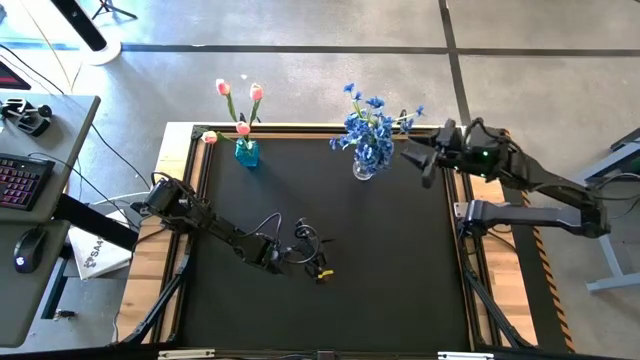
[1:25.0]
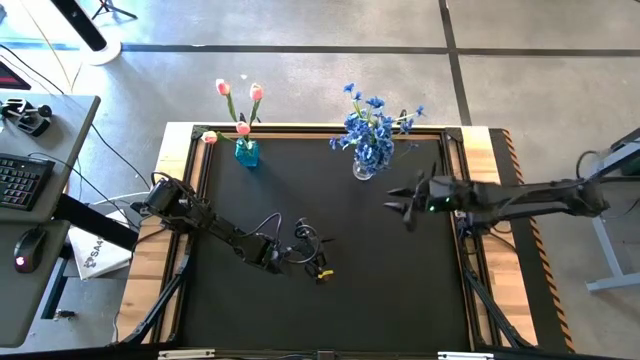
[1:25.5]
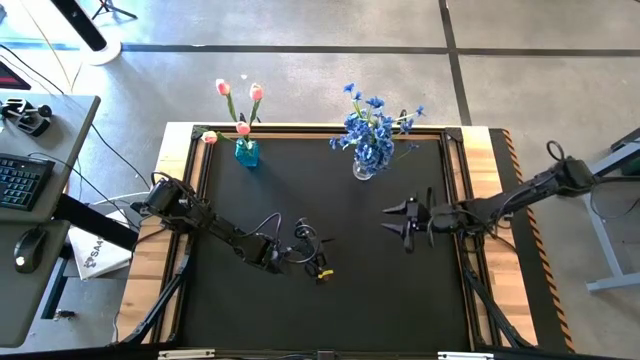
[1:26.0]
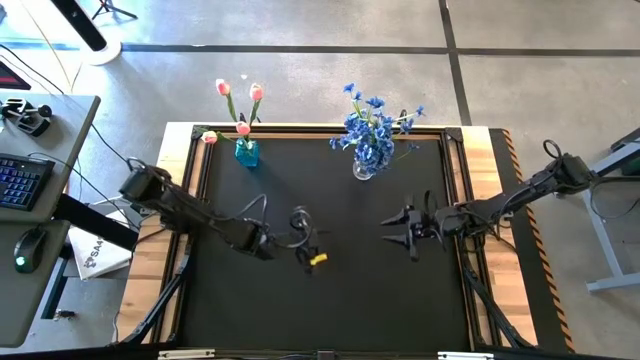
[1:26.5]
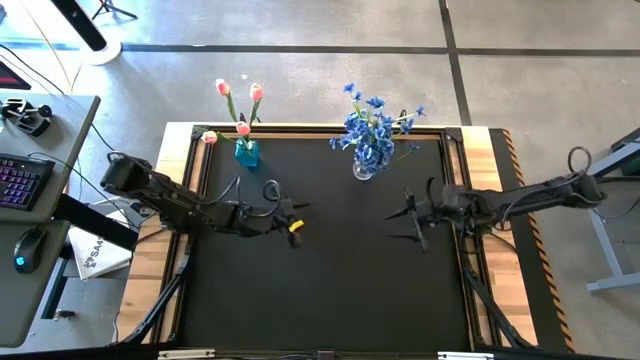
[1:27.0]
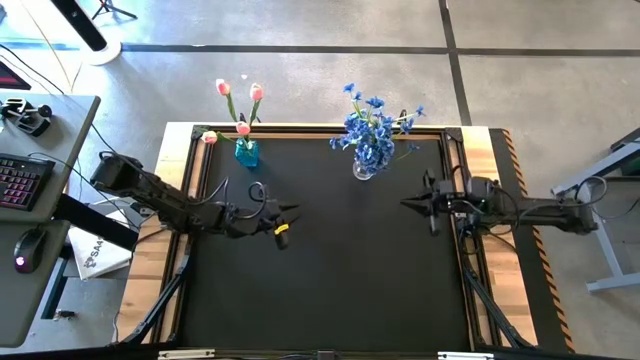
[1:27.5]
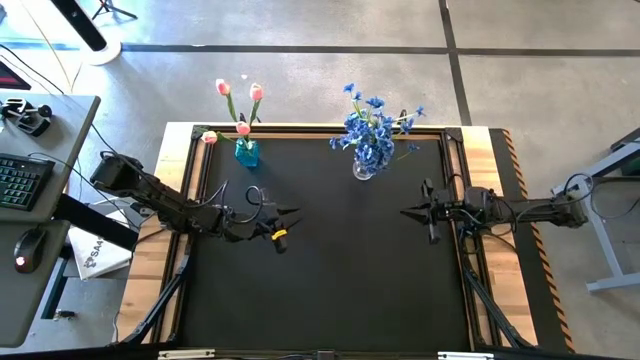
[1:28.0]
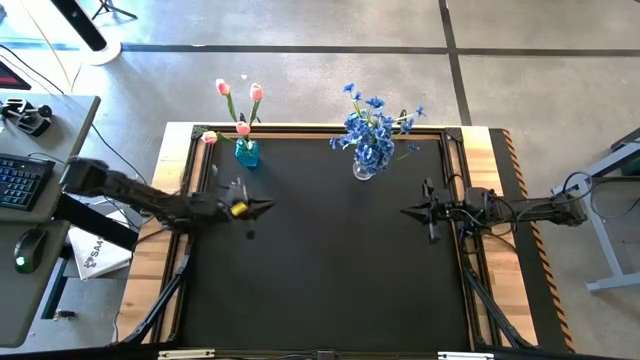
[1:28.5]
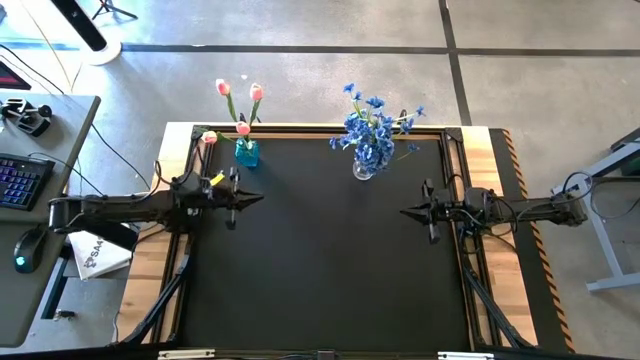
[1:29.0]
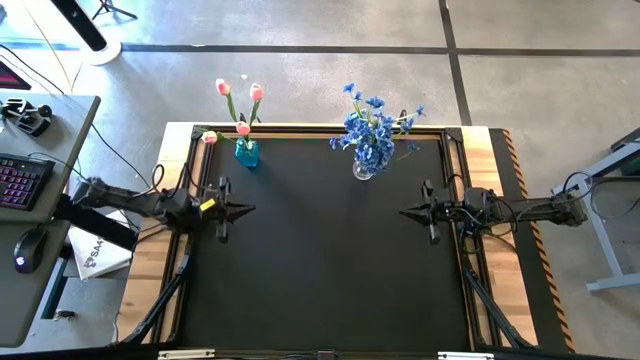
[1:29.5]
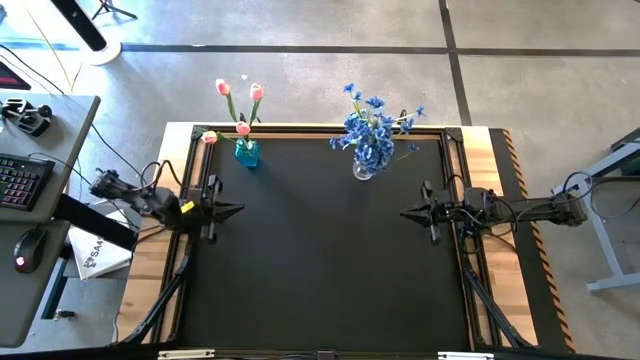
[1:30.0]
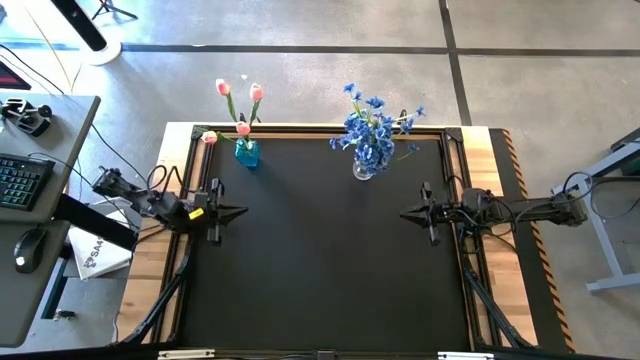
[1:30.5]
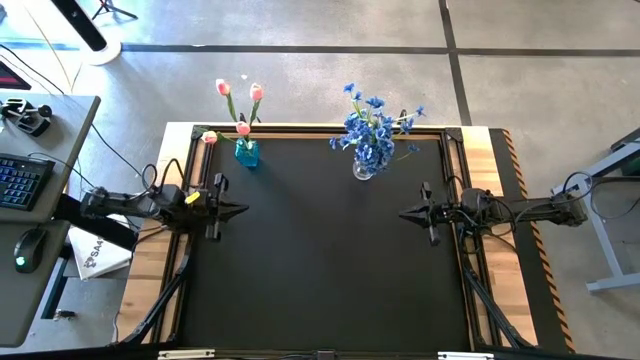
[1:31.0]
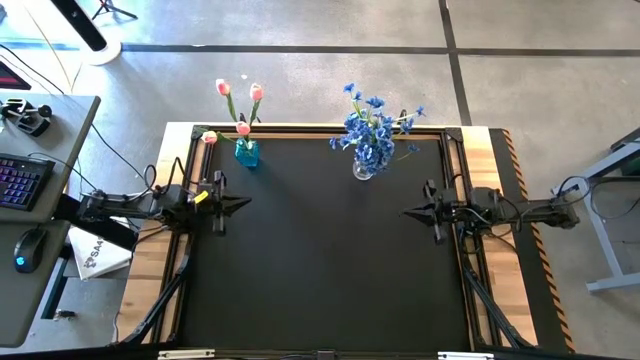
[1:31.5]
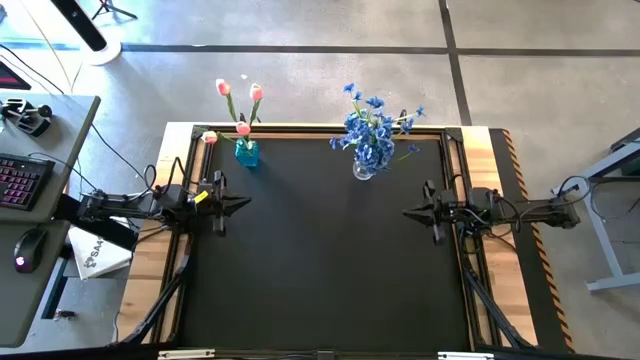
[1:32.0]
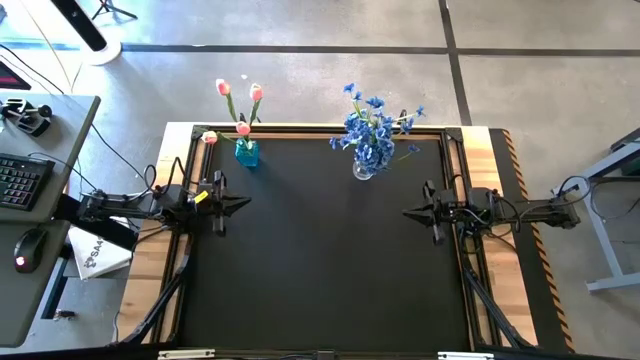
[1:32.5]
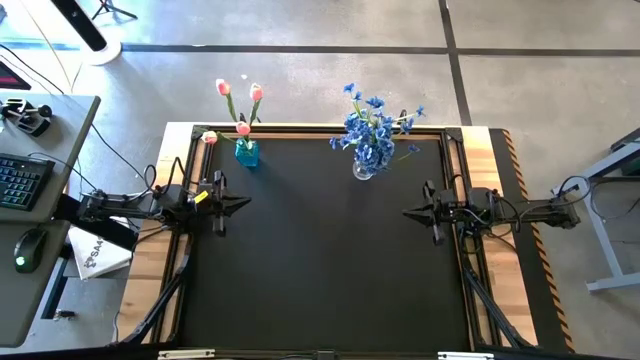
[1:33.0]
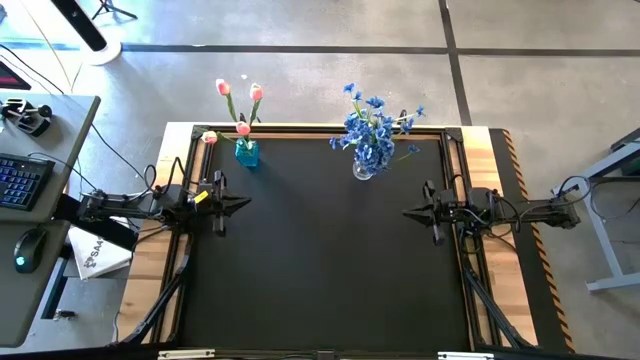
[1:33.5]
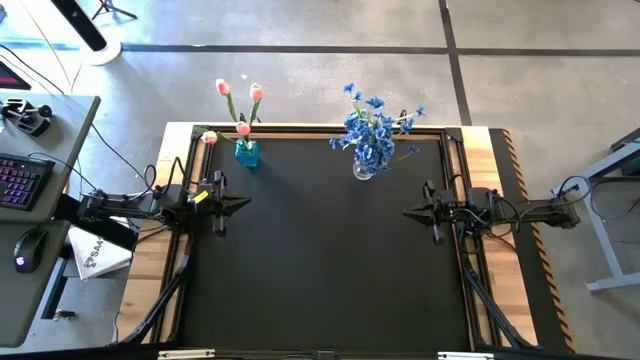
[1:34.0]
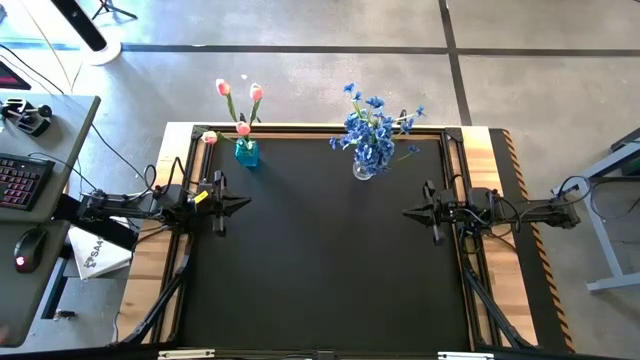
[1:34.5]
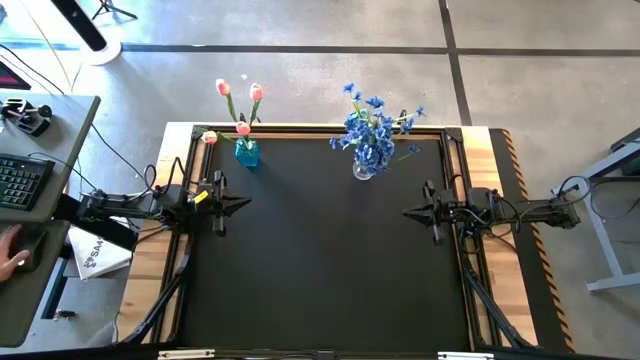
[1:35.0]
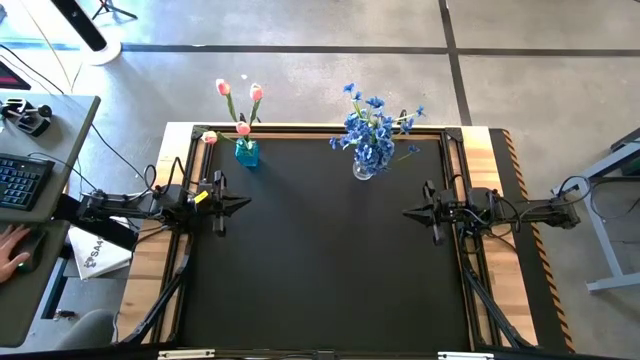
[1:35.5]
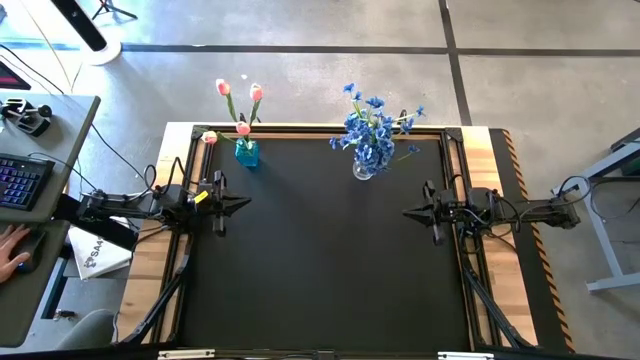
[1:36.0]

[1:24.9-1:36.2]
Task: Sort flowers into vase by color
Return to Home Position

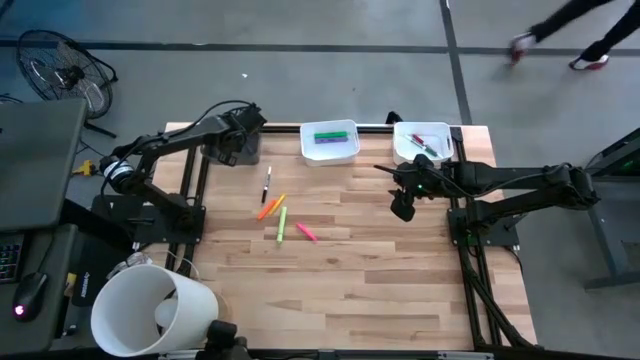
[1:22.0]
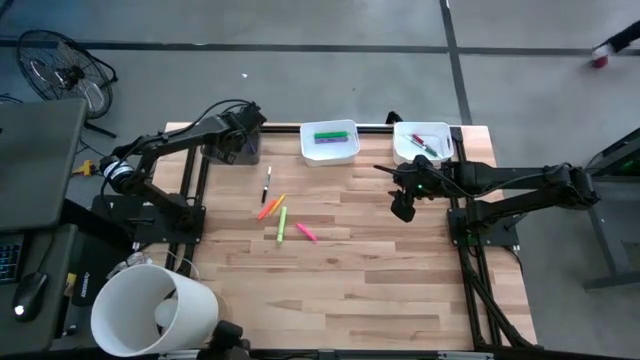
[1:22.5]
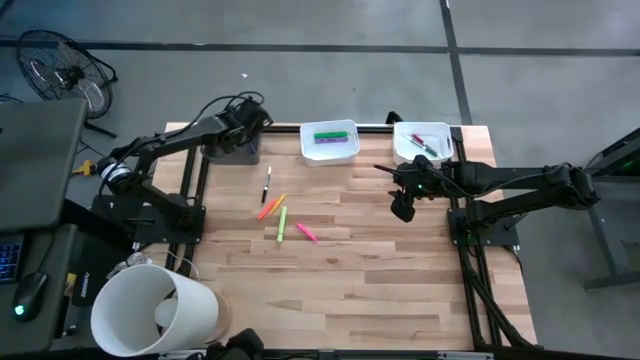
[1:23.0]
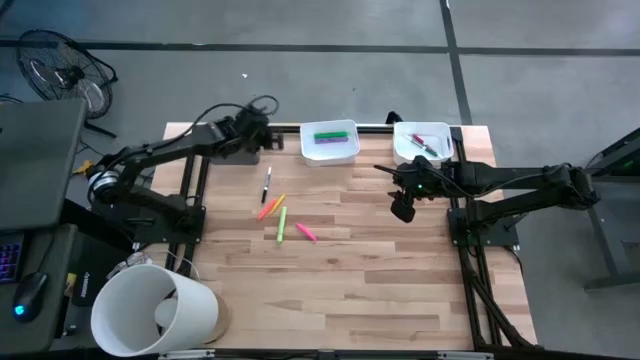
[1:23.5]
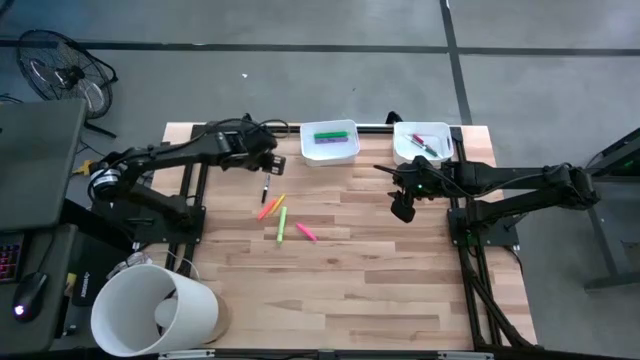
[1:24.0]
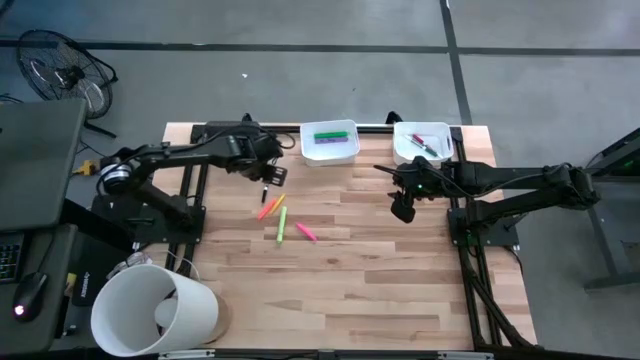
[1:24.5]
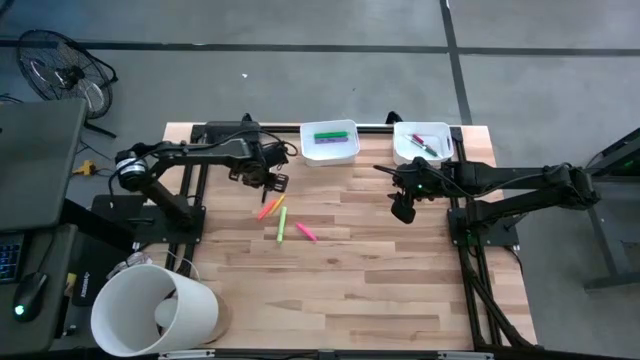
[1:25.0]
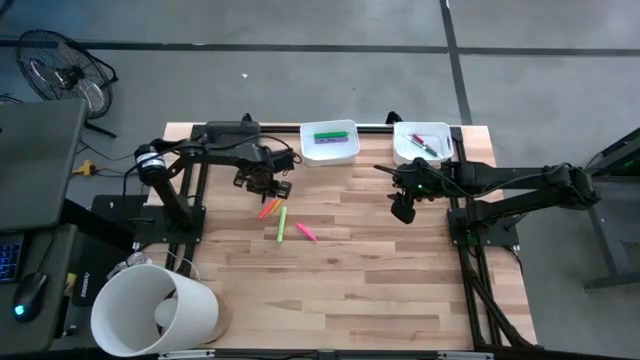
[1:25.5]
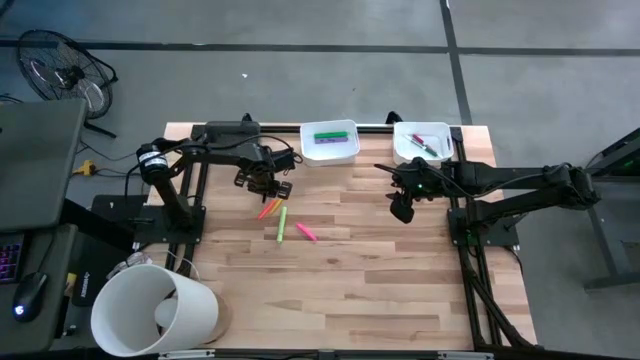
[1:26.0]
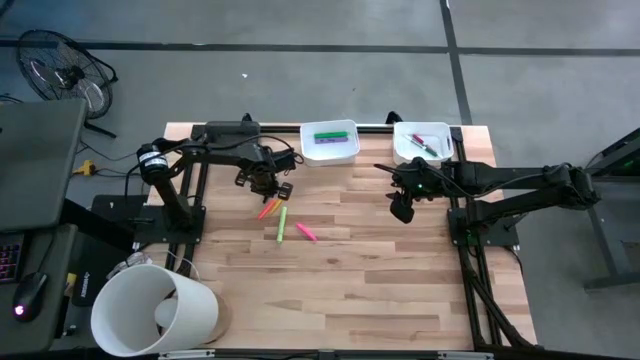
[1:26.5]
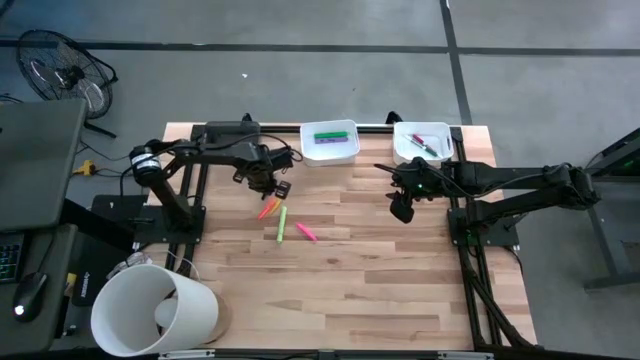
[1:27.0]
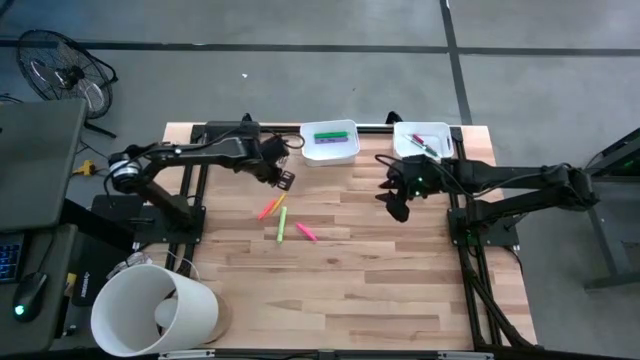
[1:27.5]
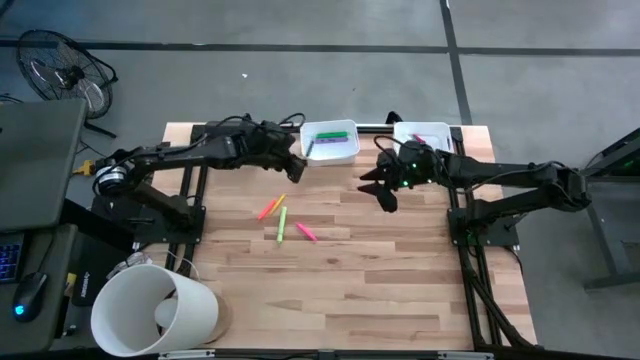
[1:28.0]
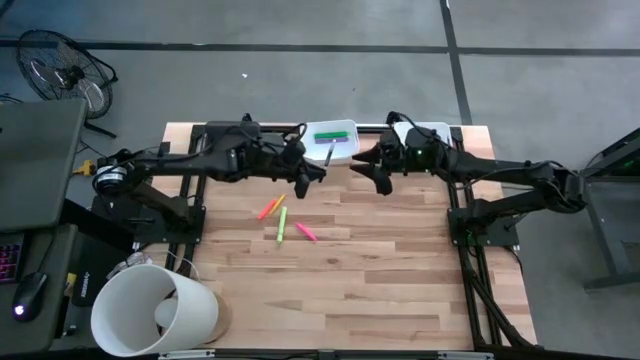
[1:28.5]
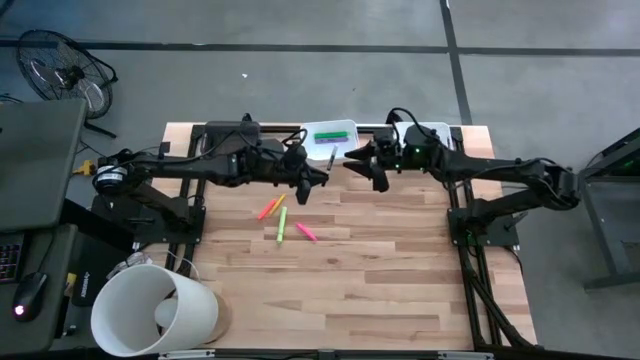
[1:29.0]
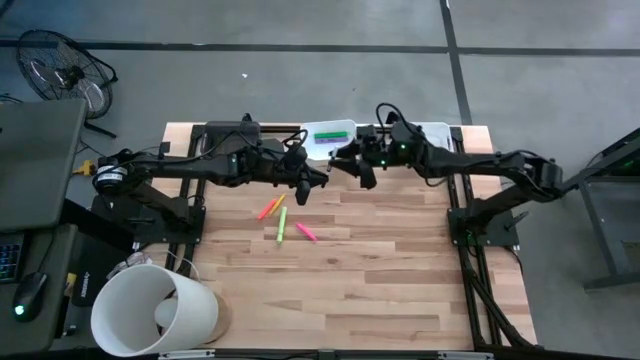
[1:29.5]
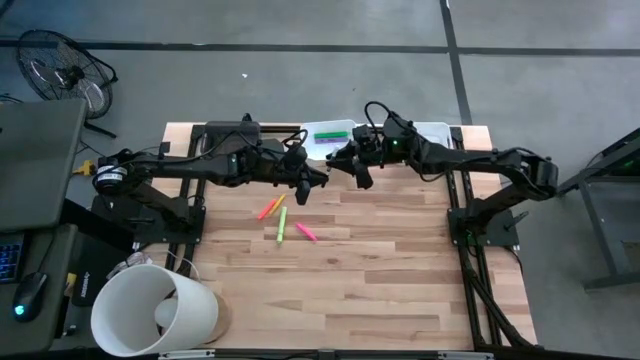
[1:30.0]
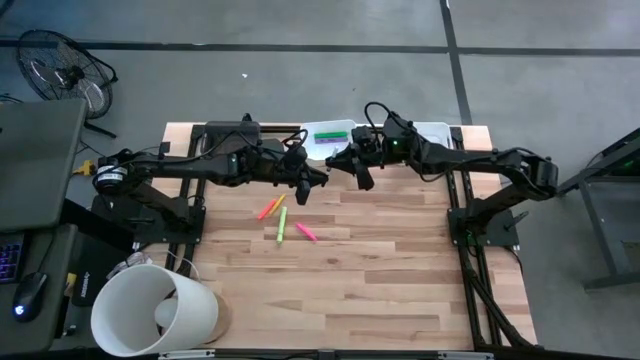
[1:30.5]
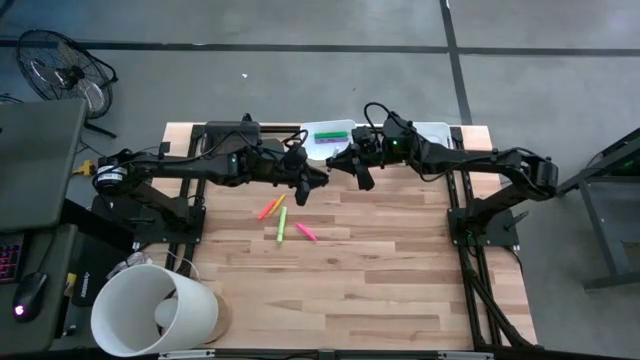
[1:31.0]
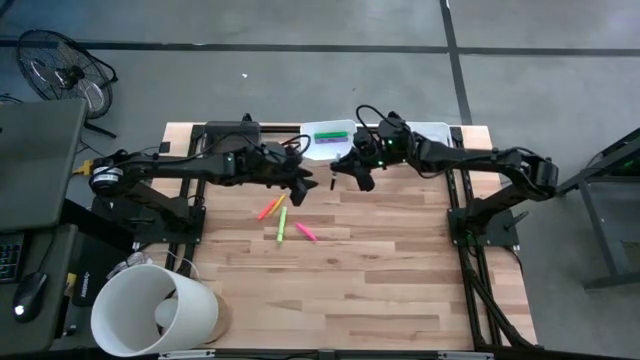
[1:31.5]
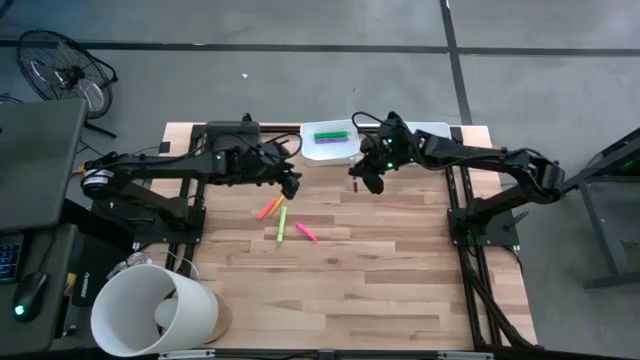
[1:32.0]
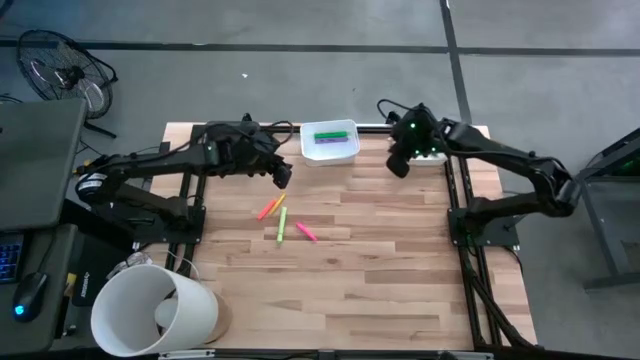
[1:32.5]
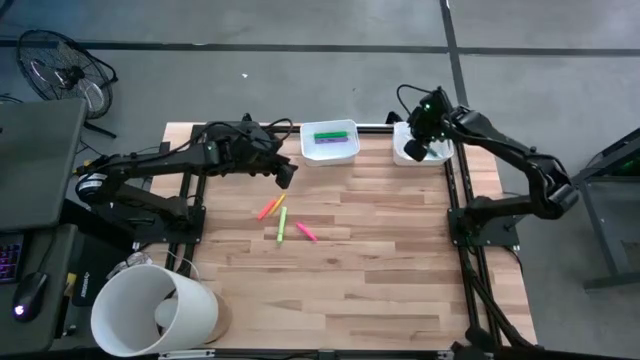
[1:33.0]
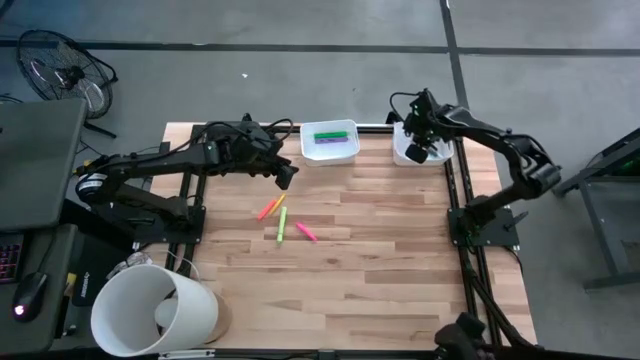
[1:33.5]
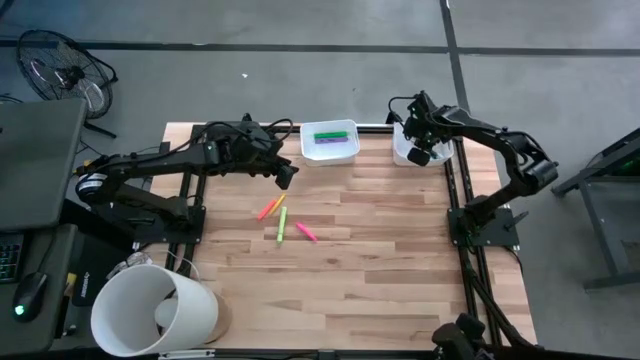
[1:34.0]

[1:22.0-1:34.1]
Task: Pick & Place Markers
Put the black marker pen into the right white bin
